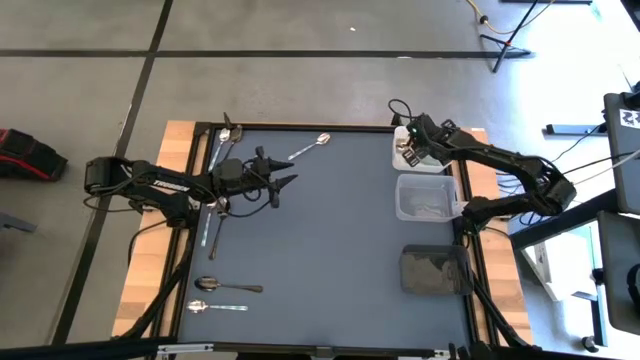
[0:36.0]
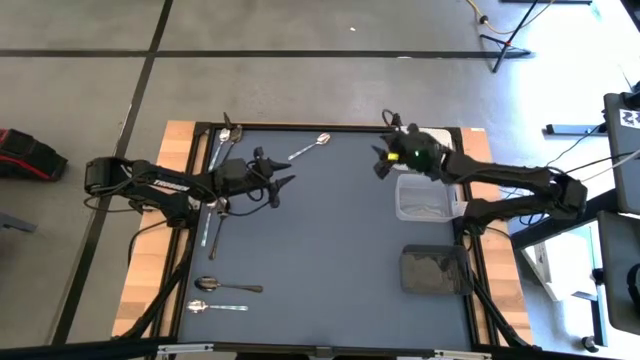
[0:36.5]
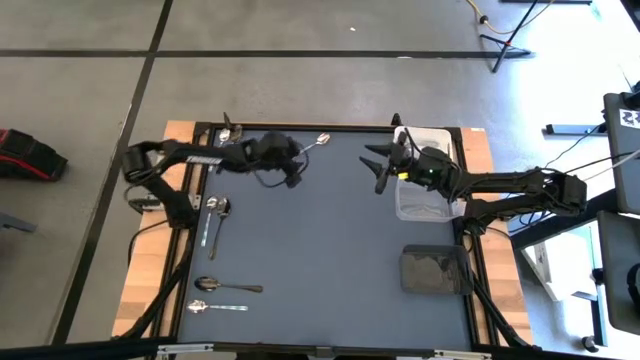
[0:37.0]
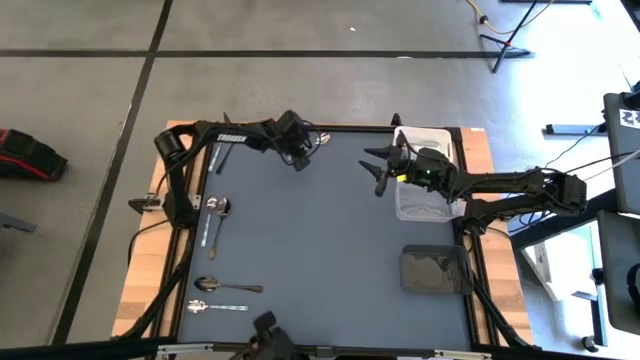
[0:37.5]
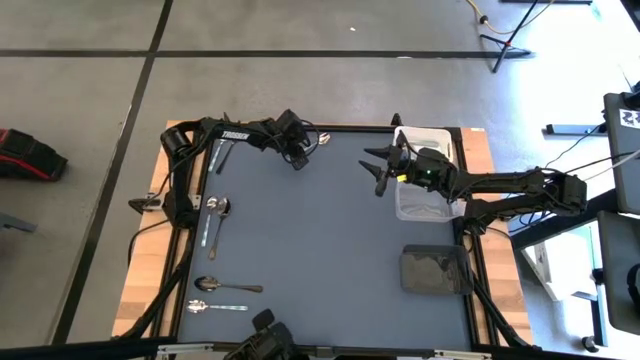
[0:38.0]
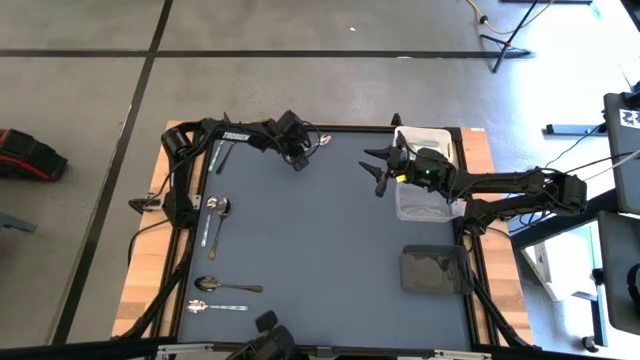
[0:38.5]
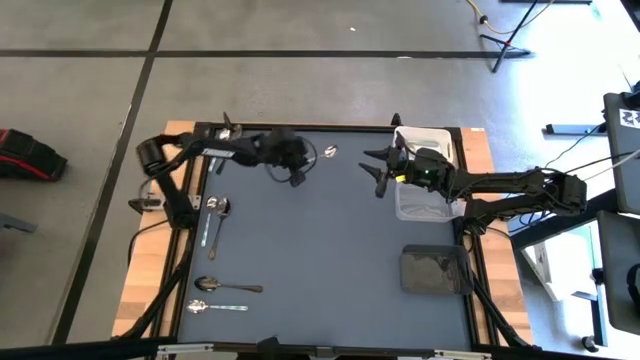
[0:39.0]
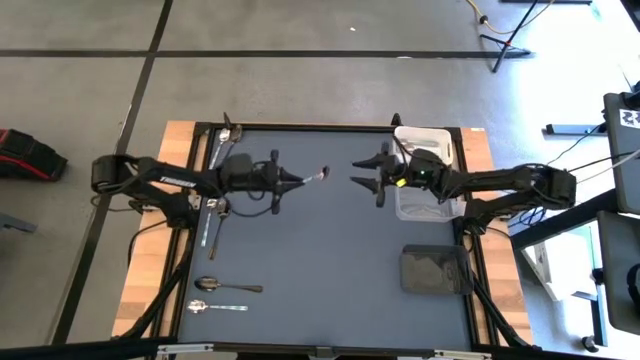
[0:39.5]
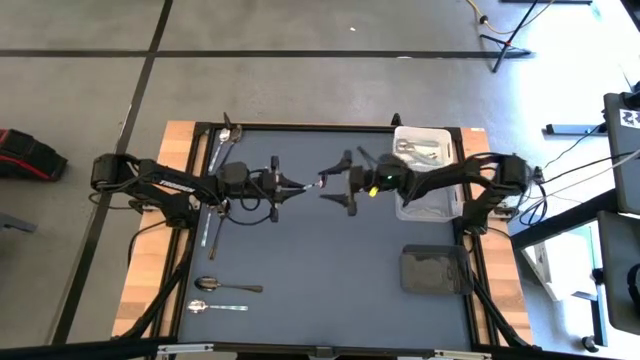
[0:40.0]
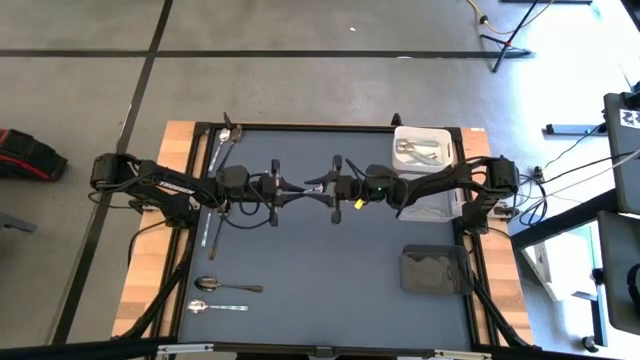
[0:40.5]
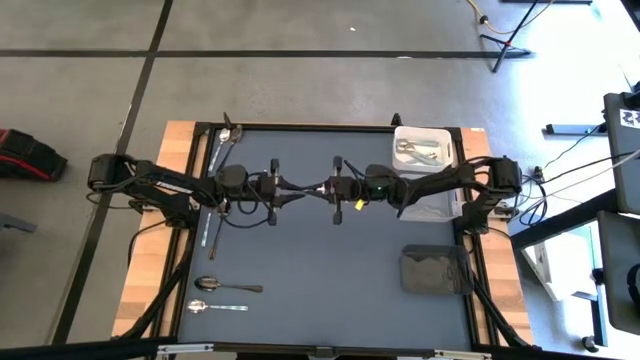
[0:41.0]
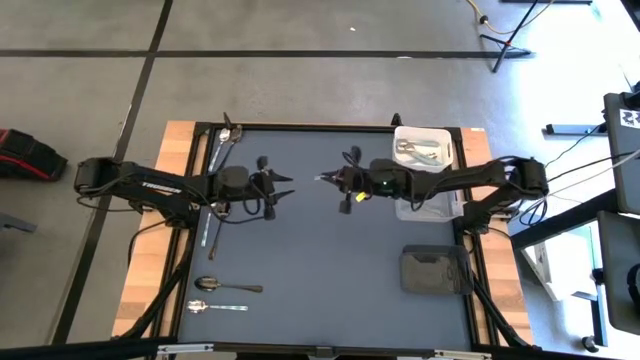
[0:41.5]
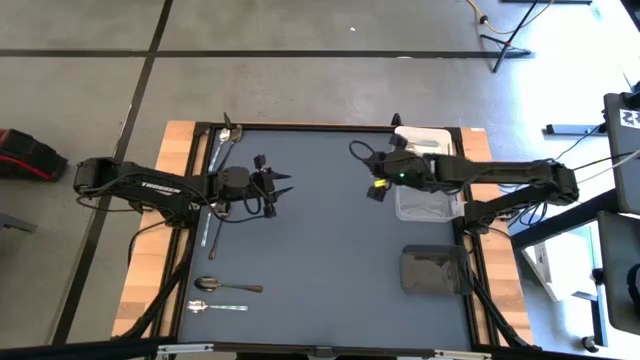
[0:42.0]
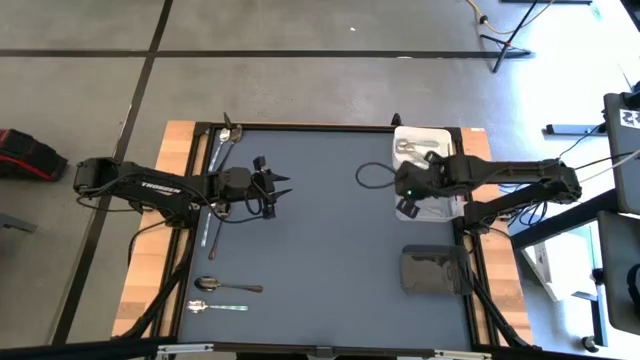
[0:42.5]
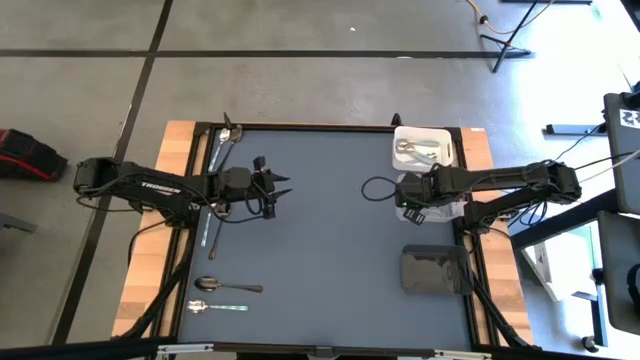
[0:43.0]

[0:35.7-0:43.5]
Task: Sort silverware by color (type)
Put the white green spoon into the transparent bin

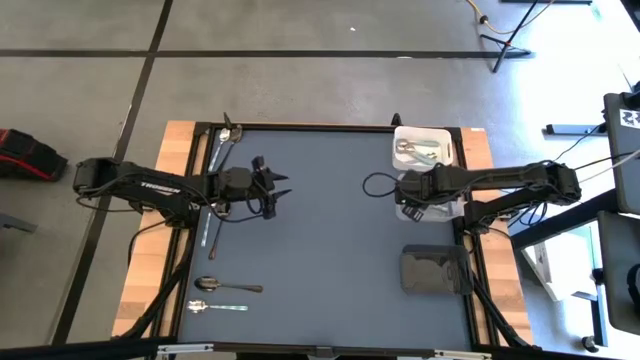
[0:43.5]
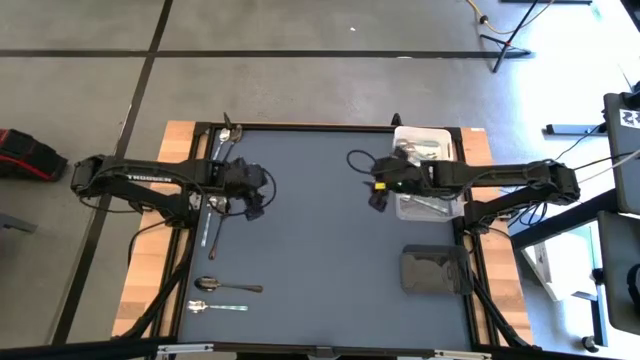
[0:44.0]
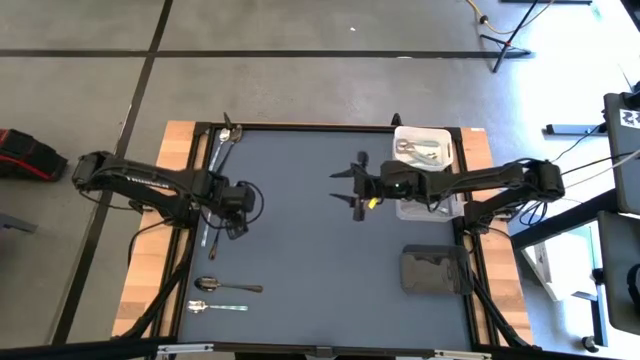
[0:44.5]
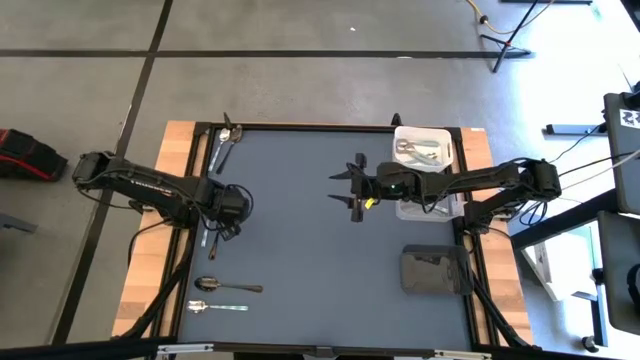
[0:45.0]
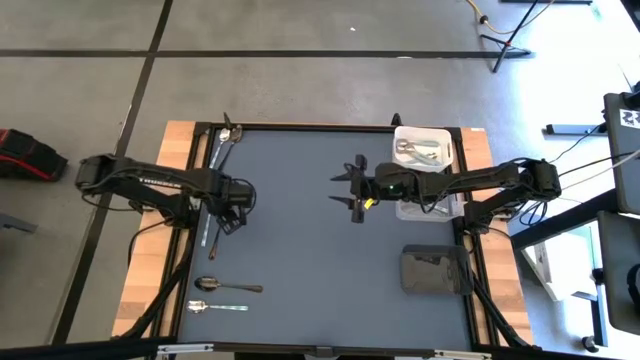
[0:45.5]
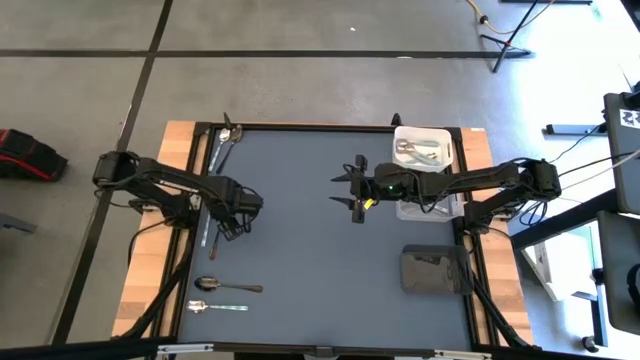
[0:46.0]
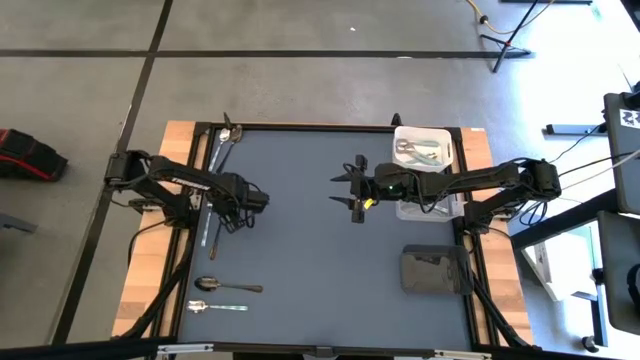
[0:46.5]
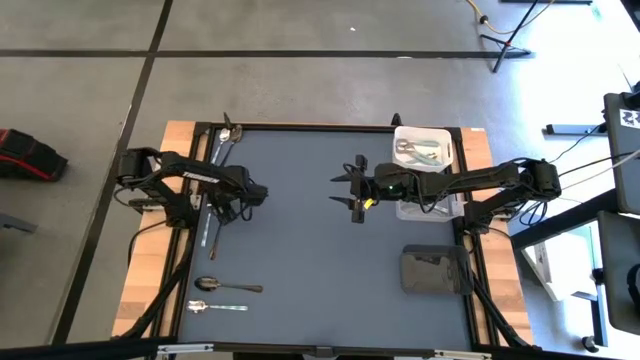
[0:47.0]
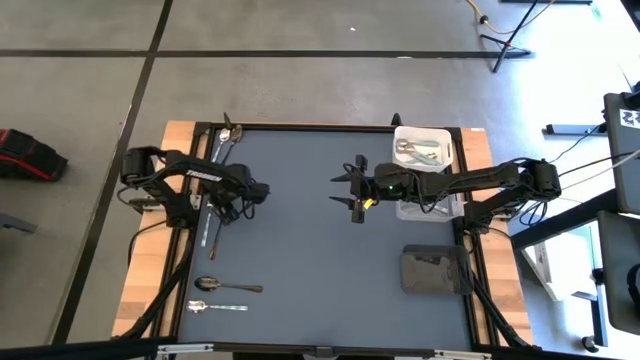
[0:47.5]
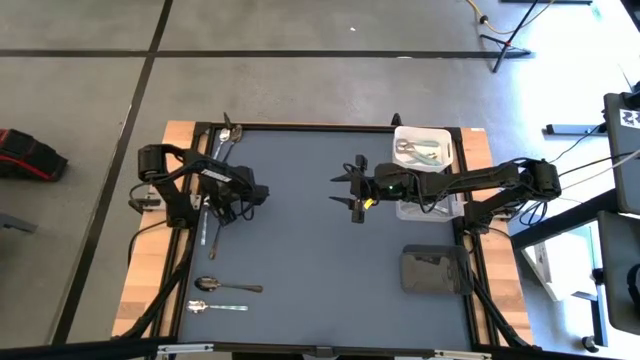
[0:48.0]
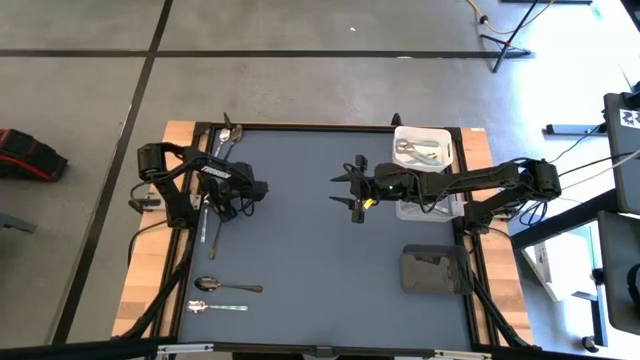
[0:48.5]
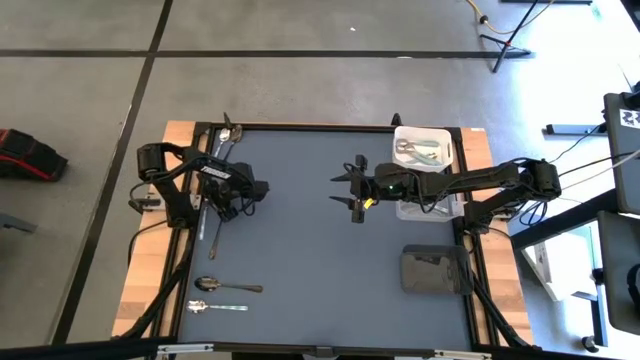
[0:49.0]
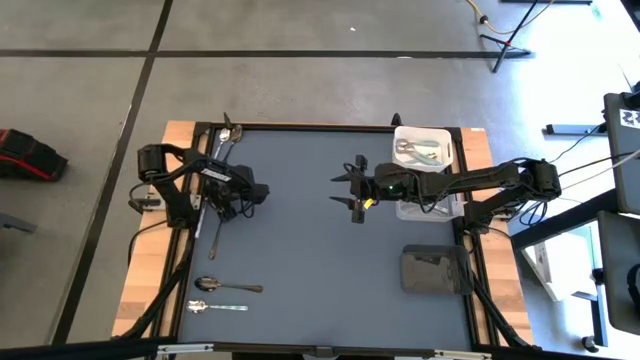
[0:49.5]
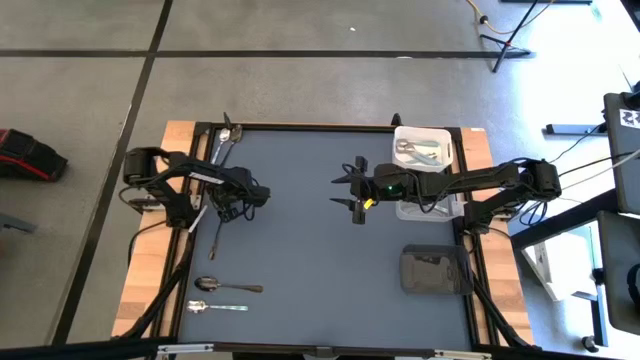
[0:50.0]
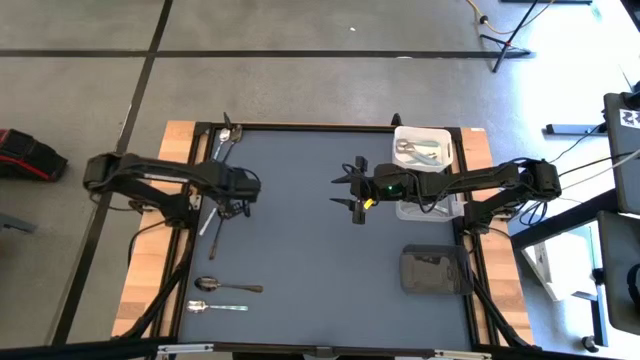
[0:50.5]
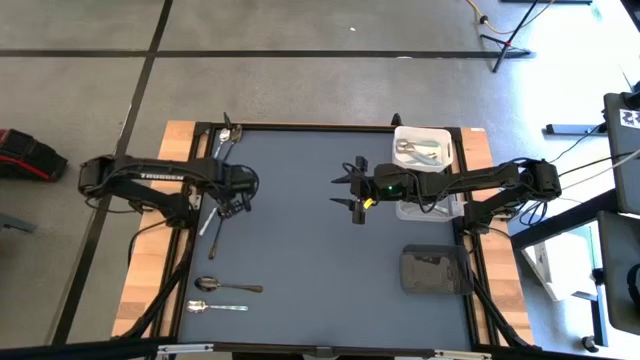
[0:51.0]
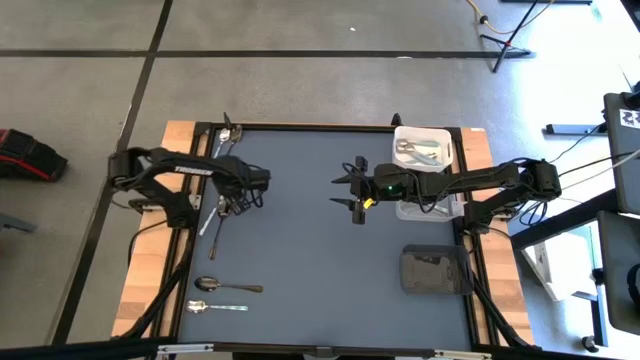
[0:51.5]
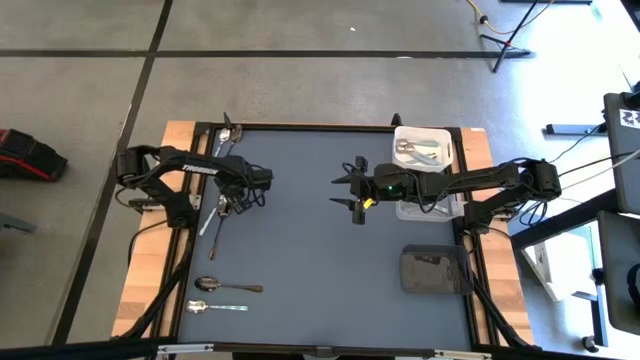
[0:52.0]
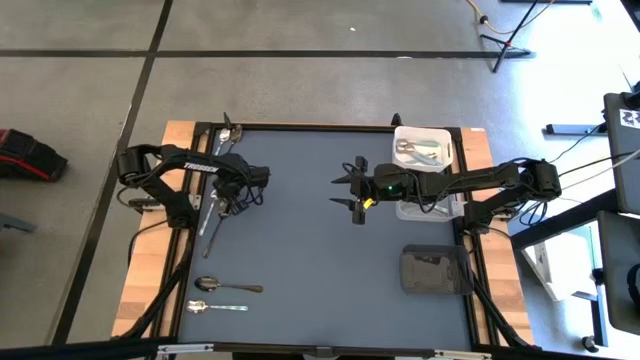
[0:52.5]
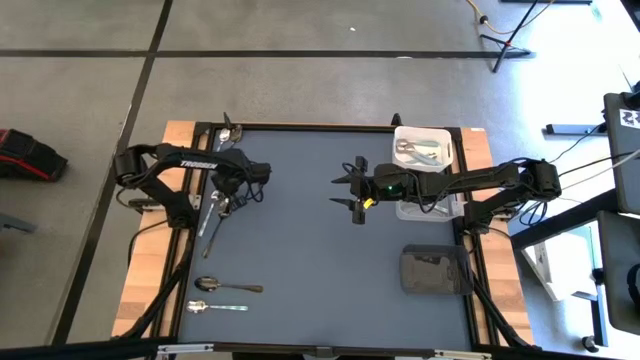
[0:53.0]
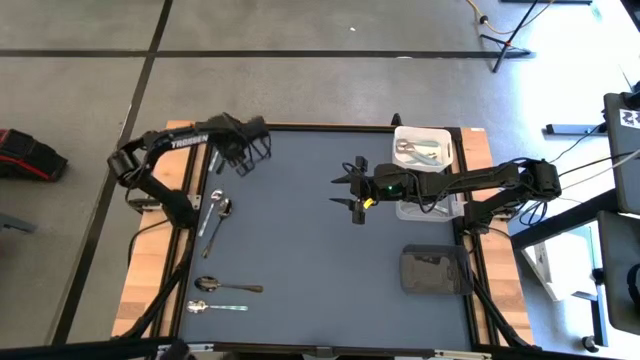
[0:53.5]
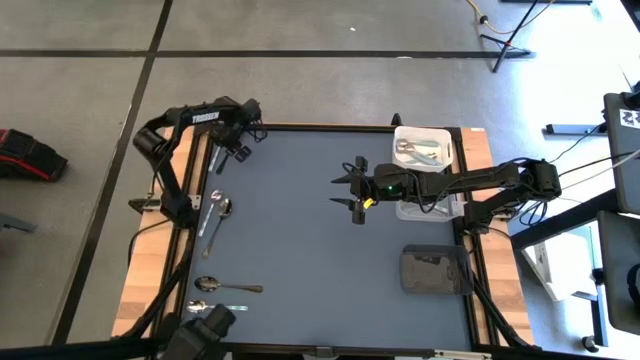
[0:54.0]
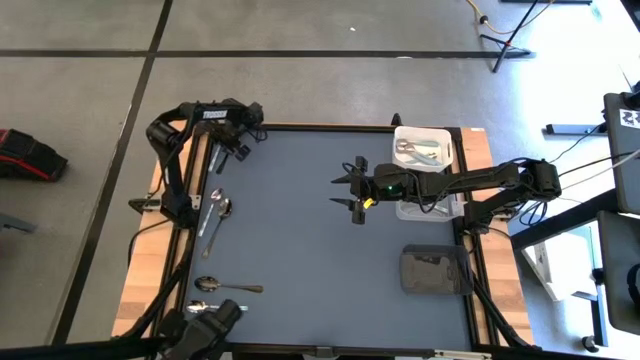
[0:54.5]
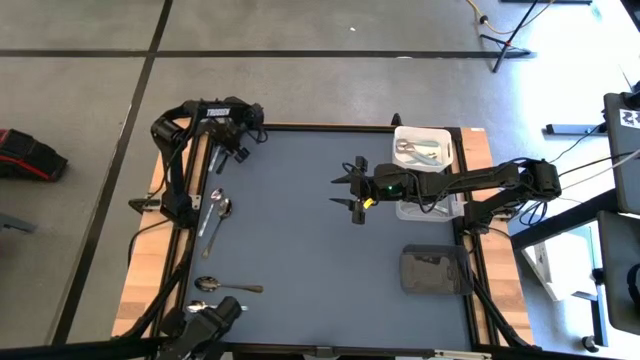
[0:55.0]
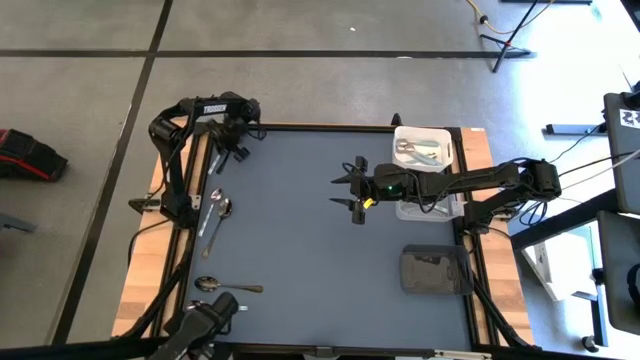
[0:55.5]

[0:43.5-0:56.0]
Put the white green spoon into the transparent bin

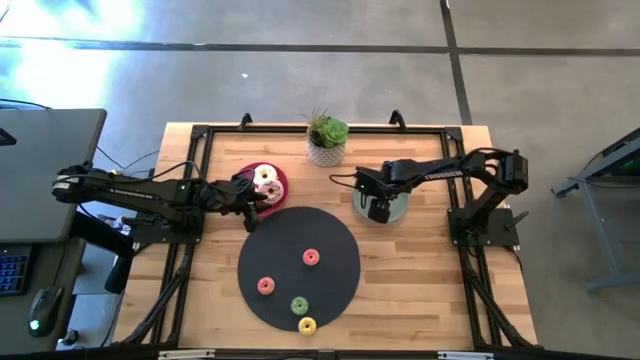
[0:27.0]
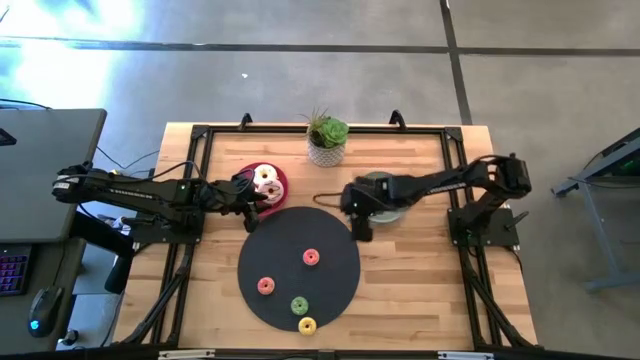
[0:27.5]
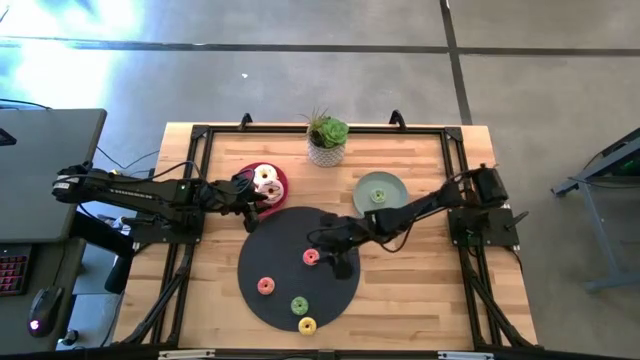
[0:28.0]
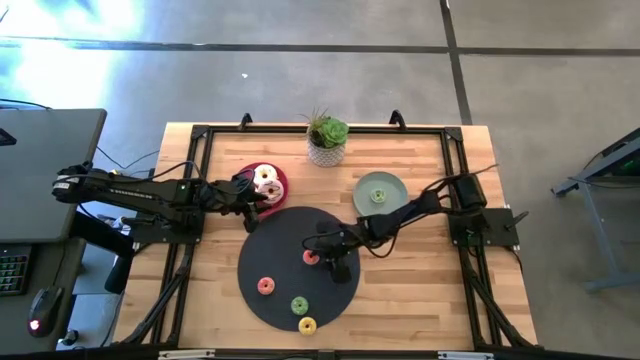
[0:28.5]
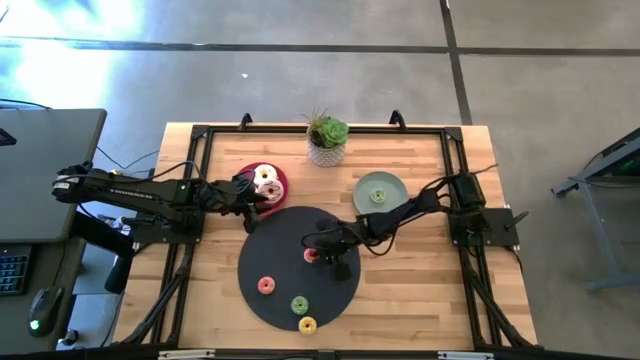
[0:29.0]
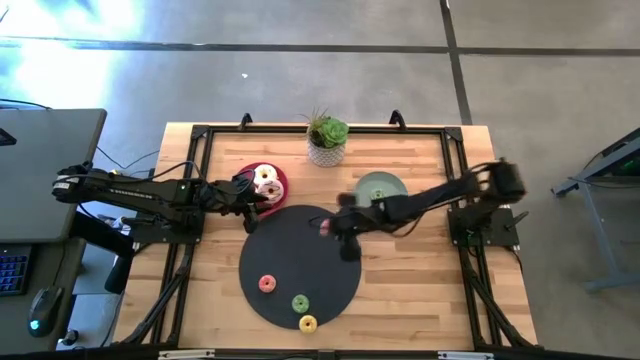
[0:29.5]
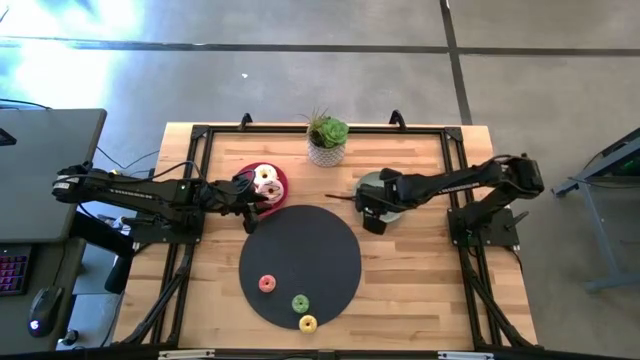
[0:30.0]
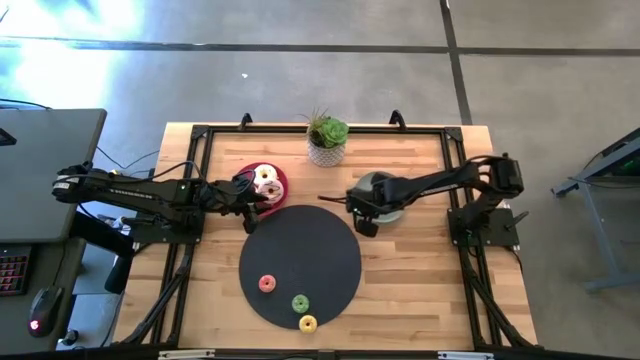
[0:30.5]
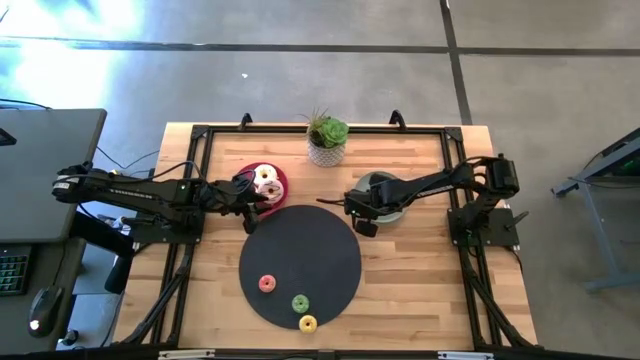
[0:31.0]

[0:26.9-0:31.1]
Task: Pick & Place donuts
Put the top small red donut on the gray plate
